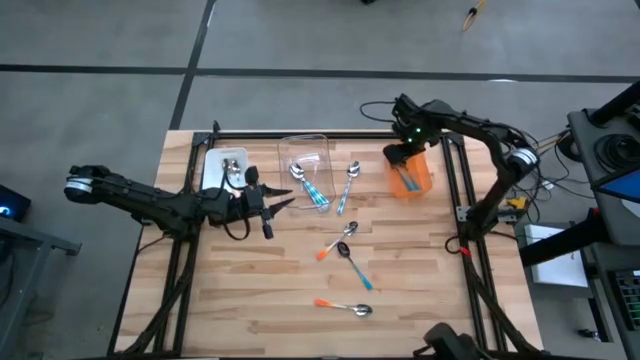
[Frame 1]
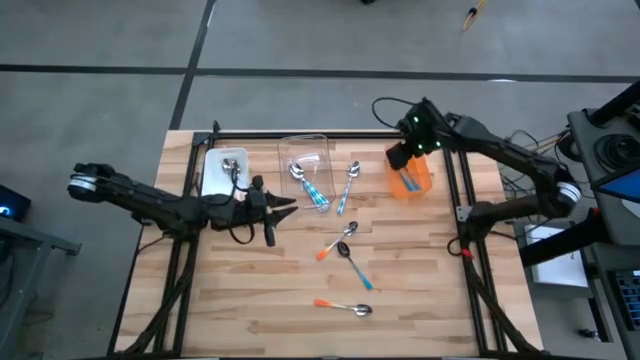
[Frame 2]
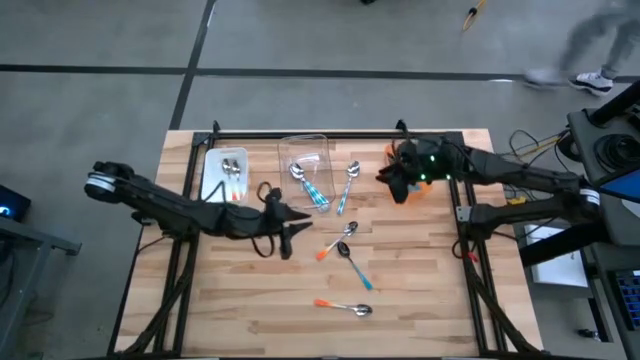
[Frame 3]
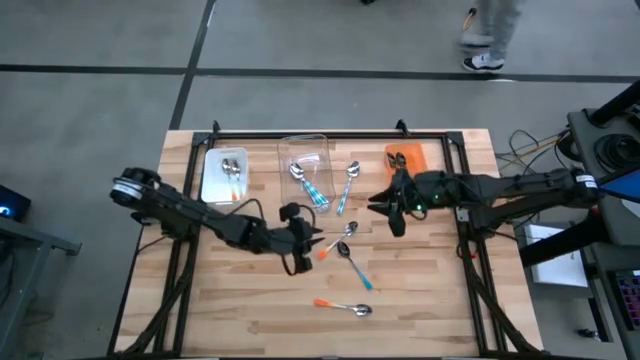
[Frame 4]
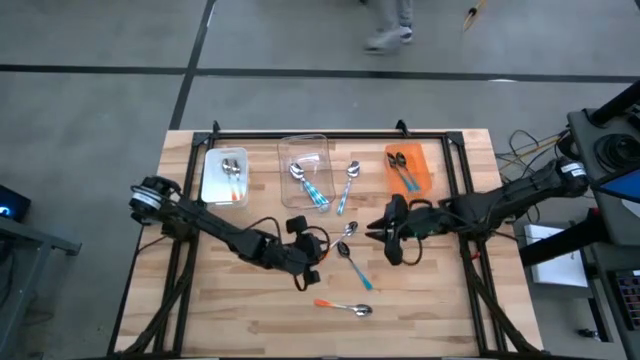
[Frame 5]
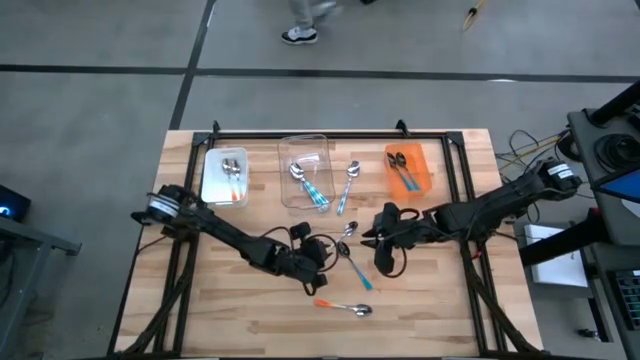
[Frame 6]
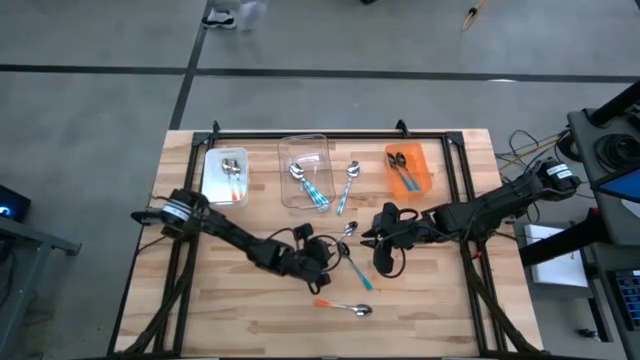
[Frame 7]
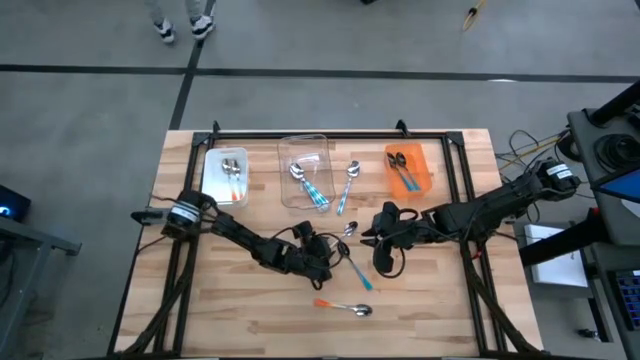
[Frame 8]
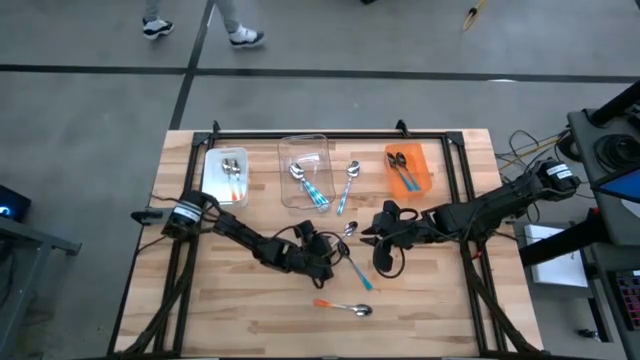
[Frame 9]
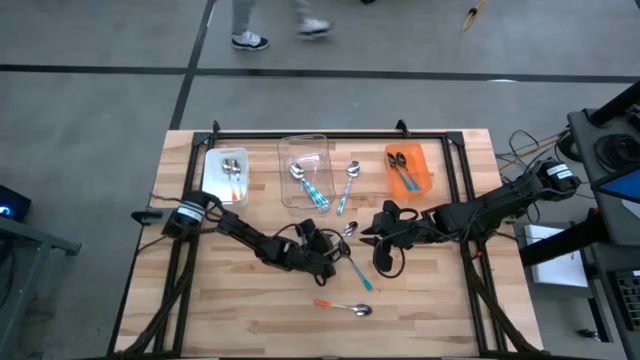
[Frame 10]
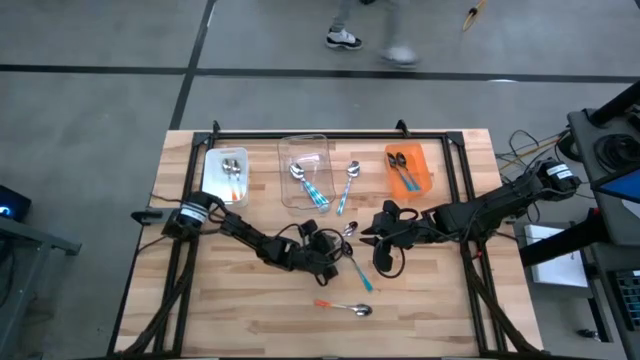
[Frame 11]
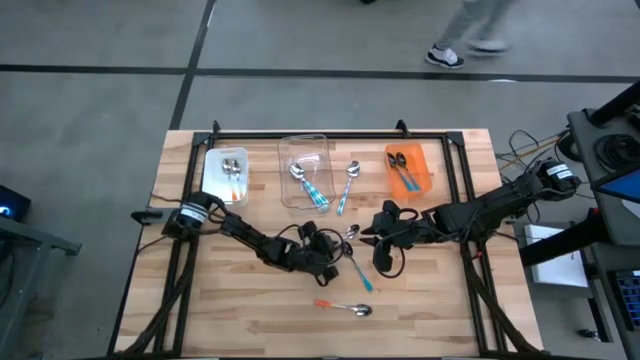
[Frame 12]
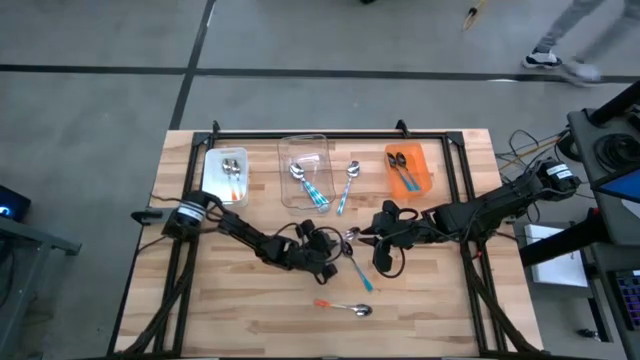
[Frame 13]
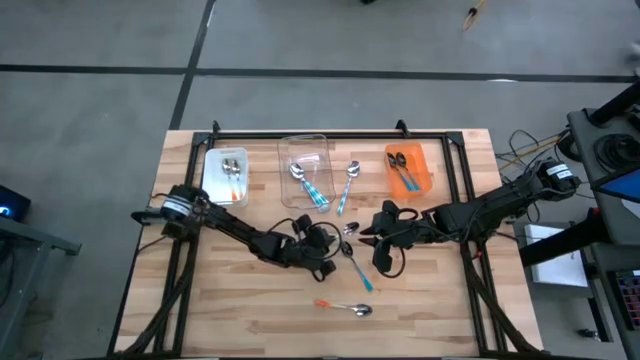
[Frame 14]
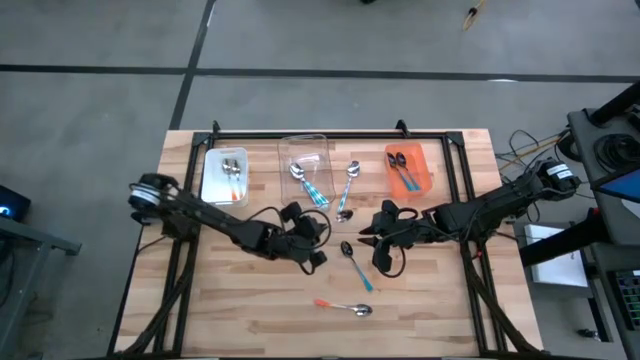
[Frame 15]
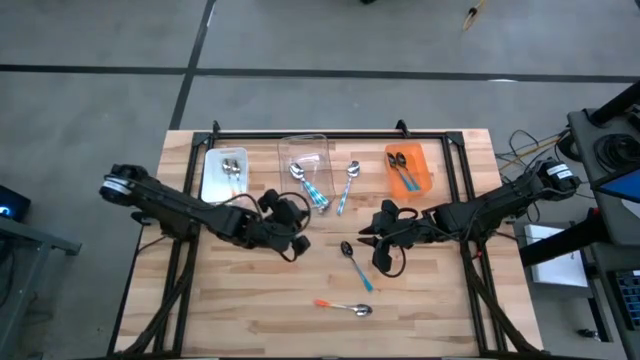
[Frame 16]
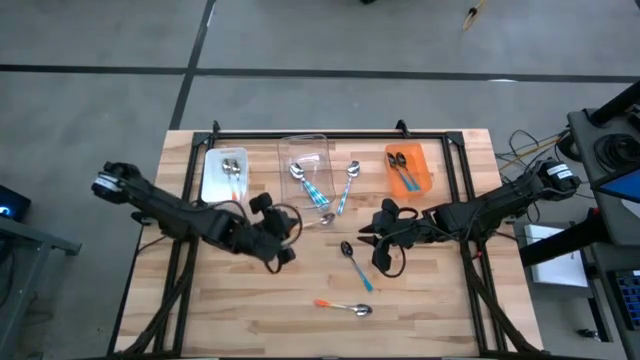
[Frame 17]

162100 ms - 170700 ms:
Task: Sort silverware by color (type)
Put the orange spoon into the white bin

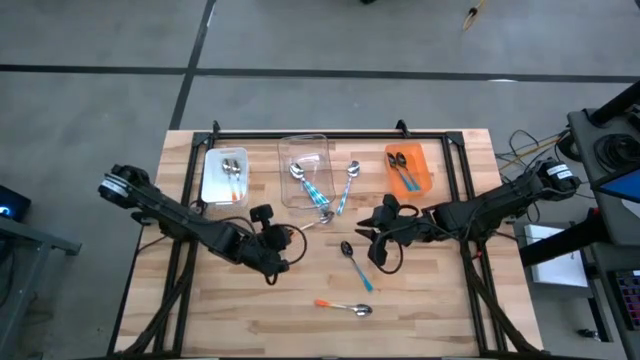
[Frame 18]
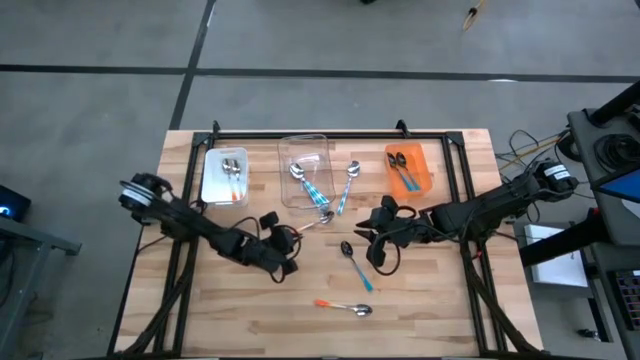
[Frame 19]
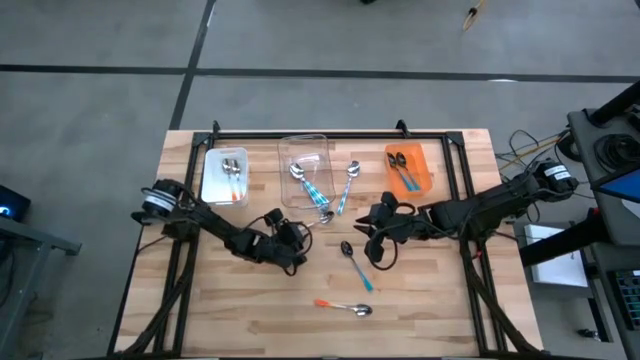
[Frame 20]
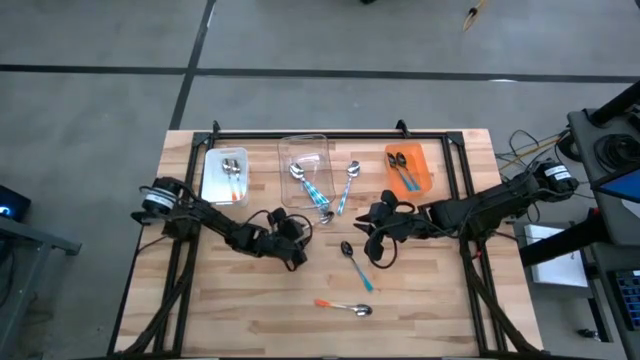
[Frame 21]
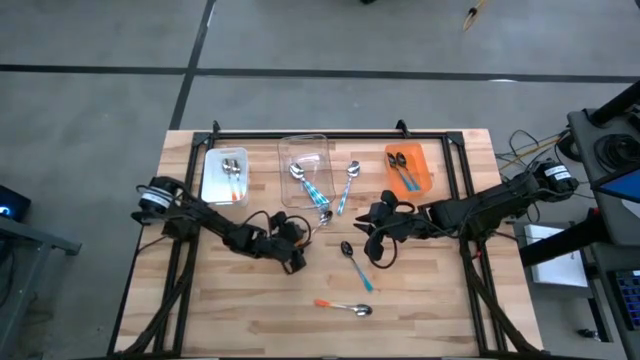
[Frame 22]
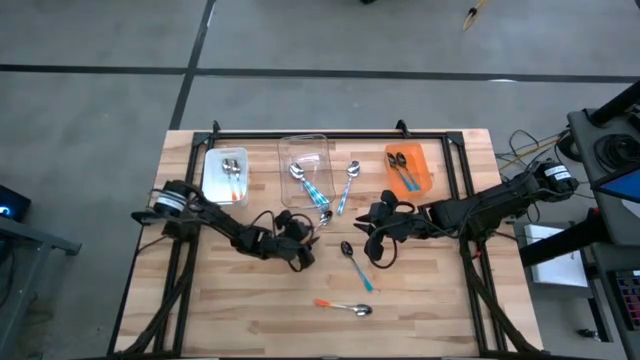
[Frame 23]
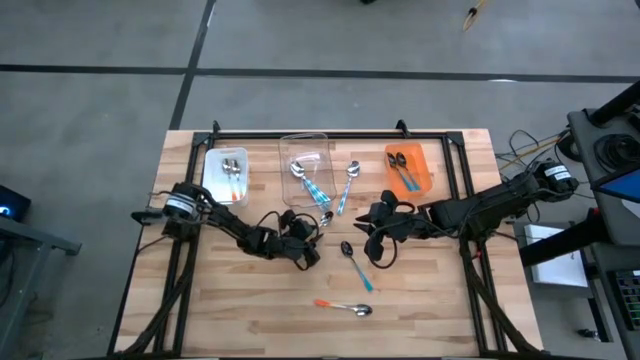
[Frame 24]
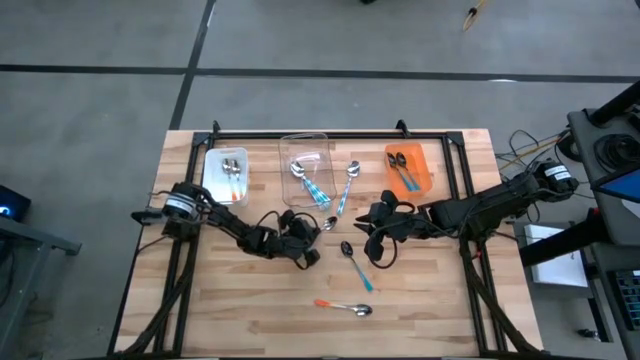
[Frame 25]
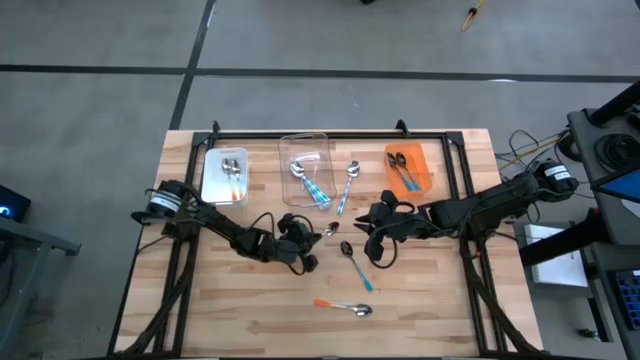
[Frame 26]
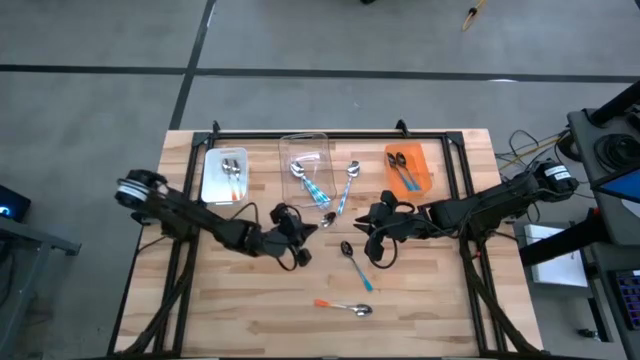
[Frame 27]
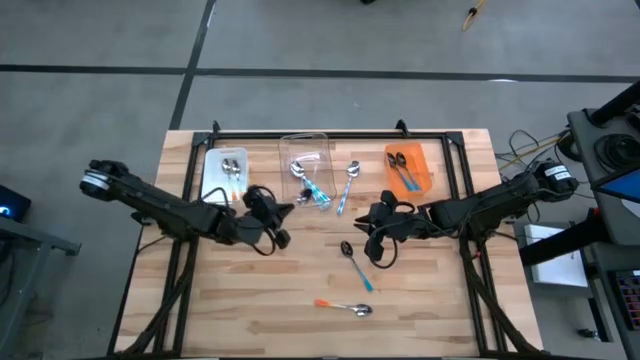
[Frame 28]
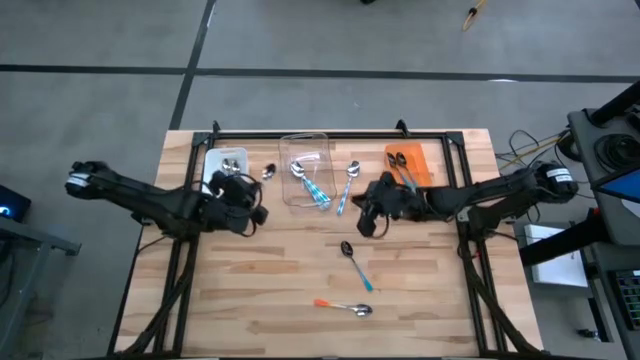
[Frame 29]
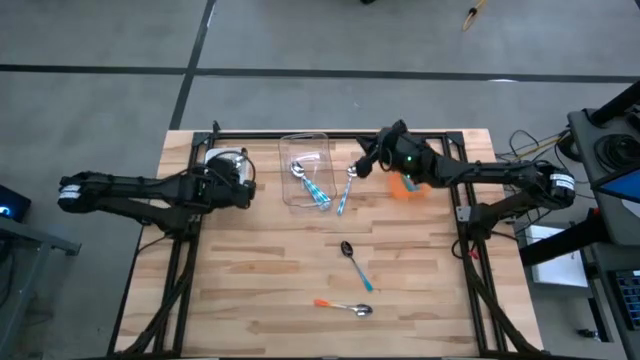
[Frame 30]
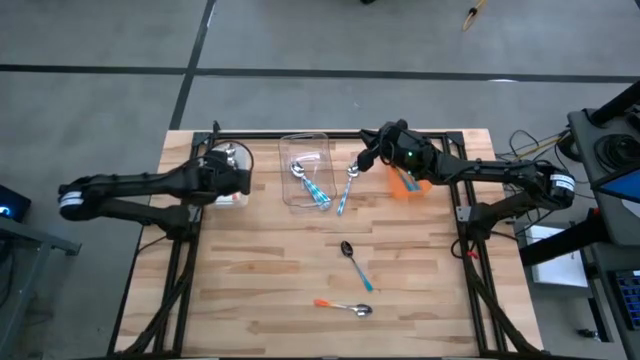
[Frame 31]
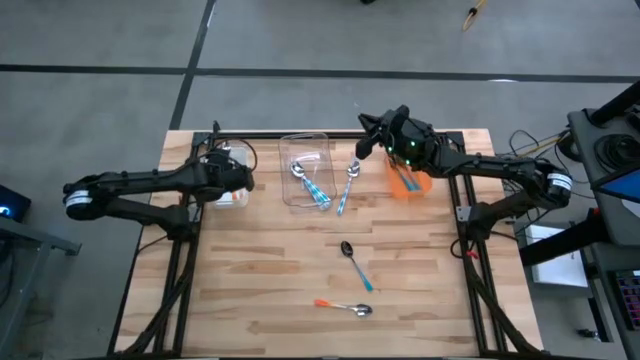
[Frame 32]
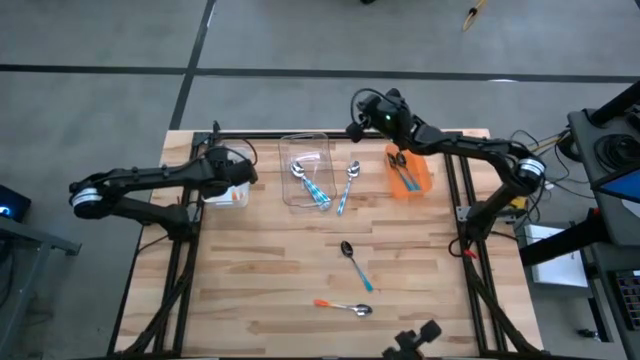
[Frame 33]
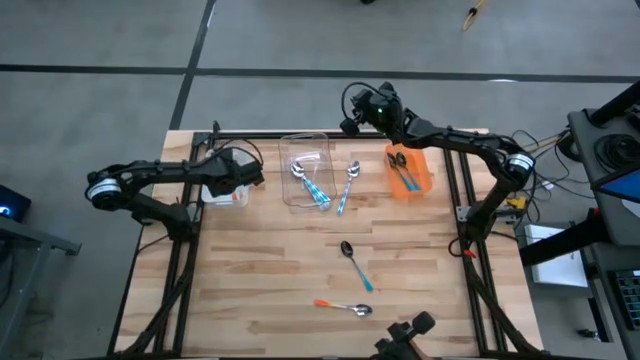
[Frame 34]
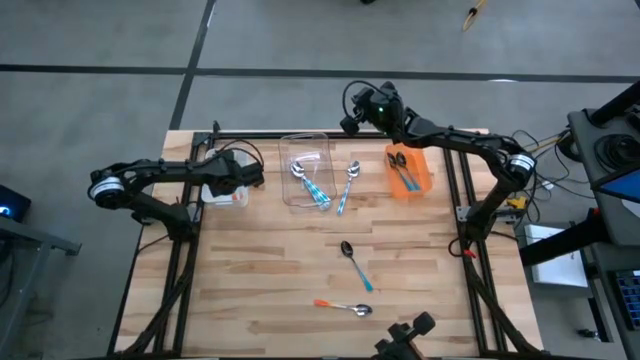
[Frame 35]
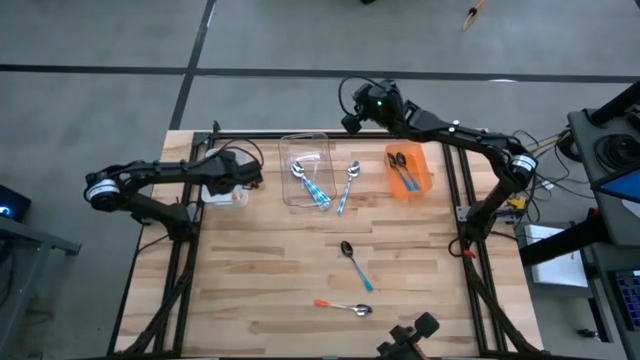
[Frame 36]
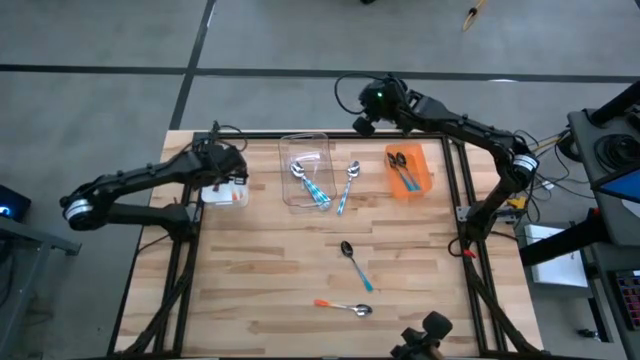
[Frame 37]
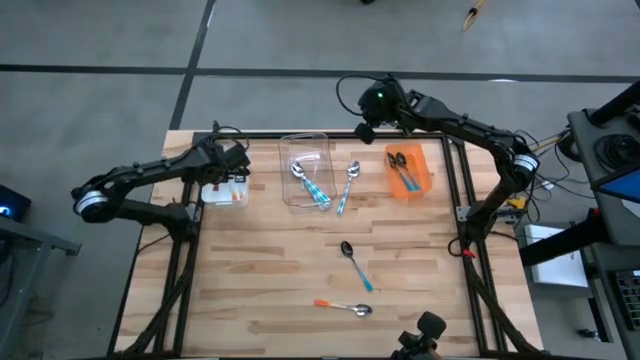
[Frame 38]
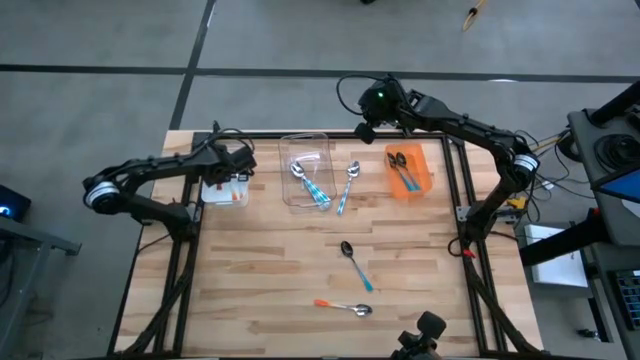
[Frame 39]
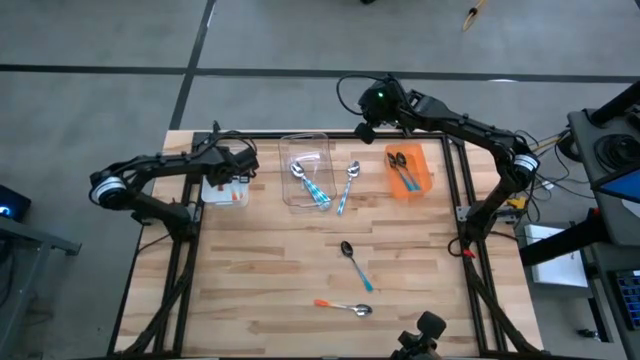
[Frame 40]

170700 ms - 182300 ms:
Put the orange spoon into the white bin

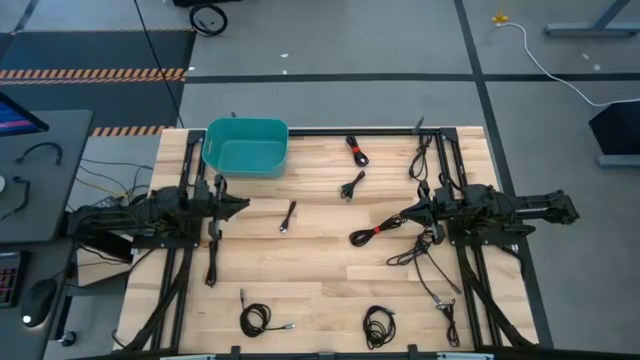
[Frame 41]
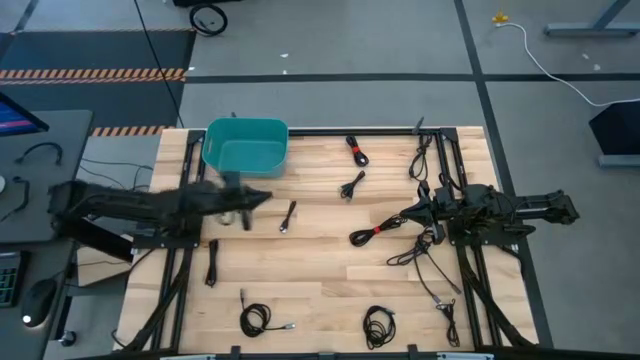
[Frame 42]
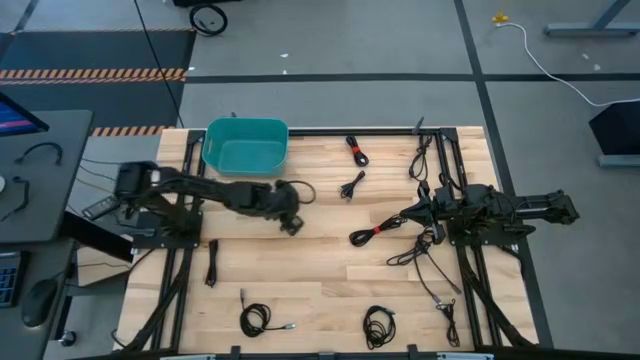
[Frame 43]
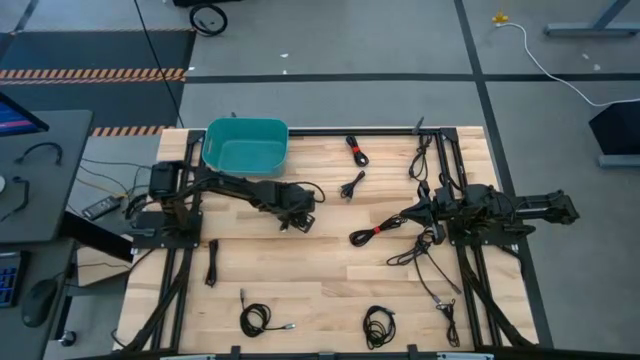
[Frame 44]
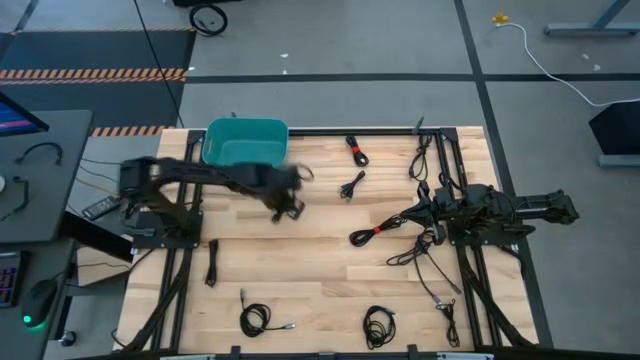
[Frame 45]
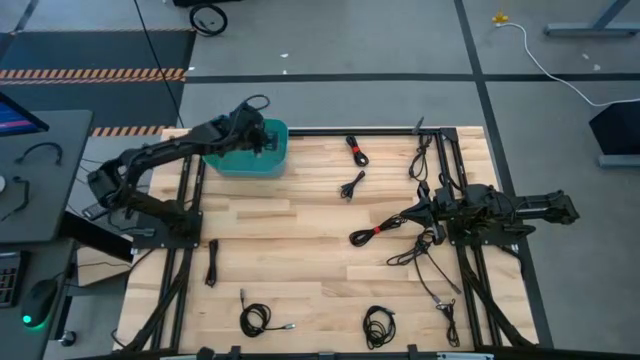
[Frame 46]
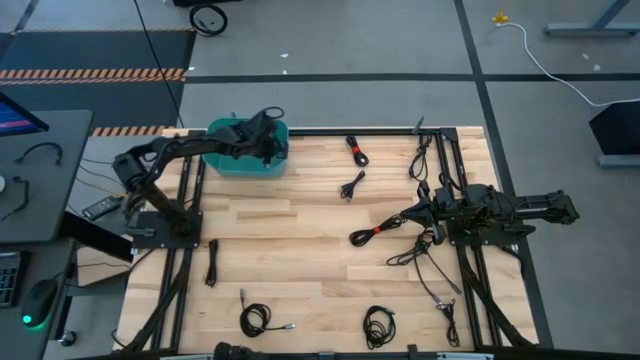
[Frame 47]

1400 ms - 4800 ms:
Task: Pick and place USB-C Cables
Put the black charger cable into the blue bin
